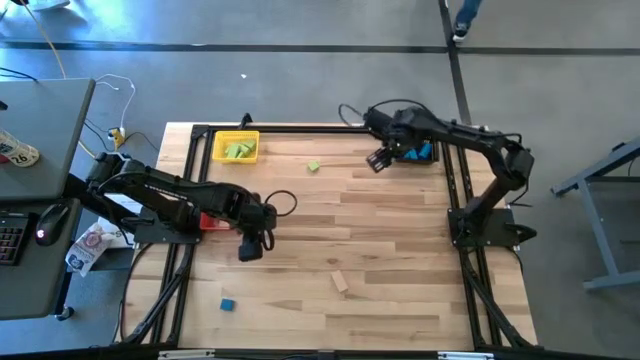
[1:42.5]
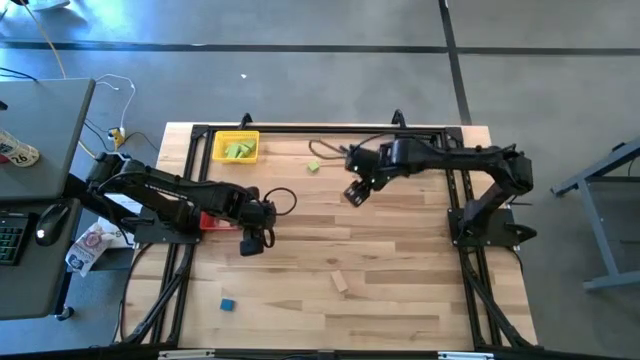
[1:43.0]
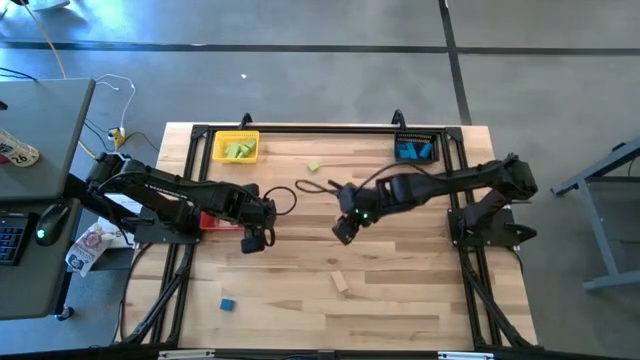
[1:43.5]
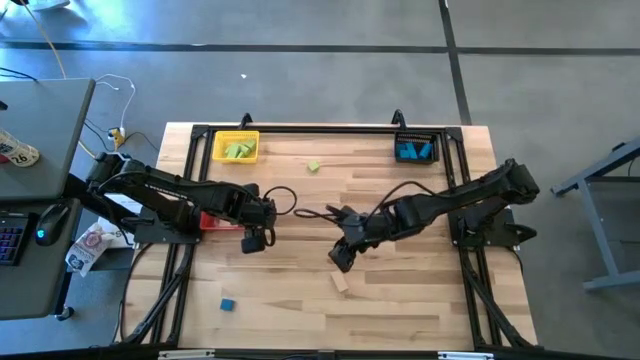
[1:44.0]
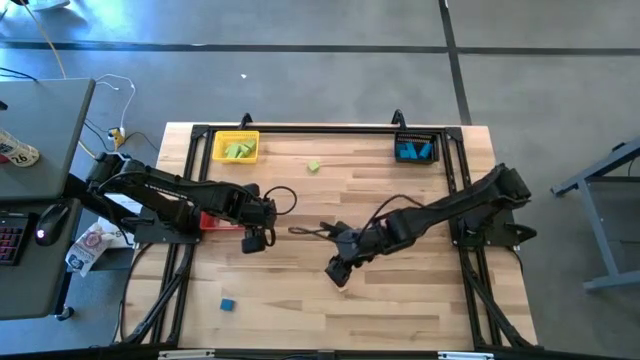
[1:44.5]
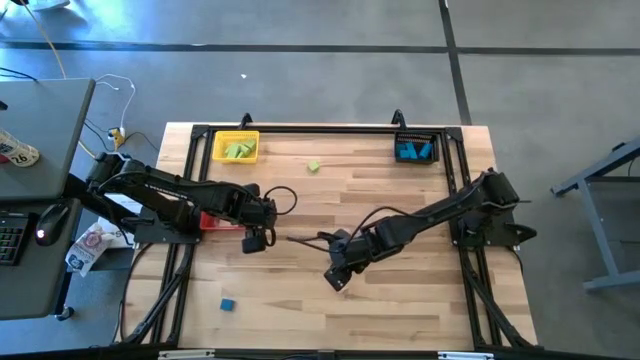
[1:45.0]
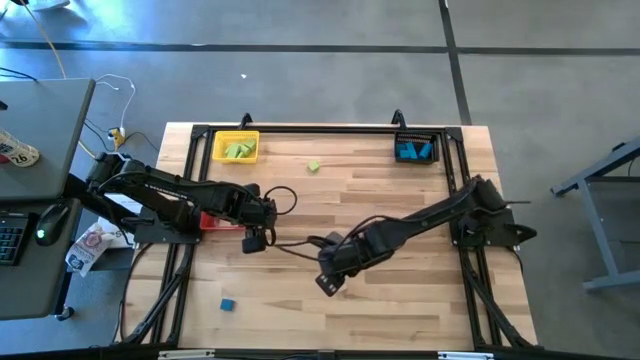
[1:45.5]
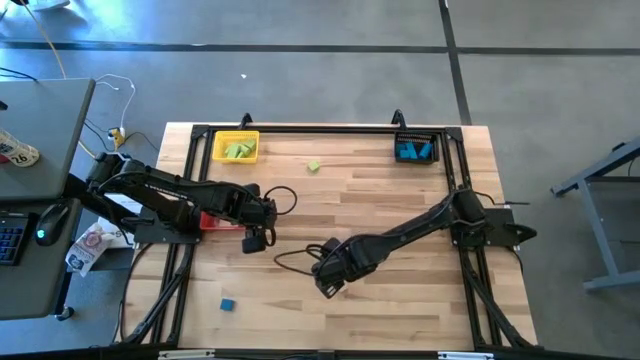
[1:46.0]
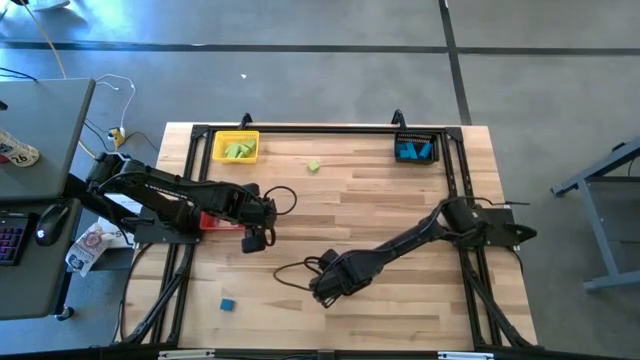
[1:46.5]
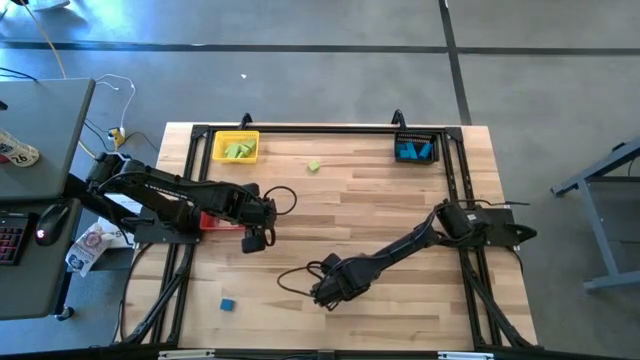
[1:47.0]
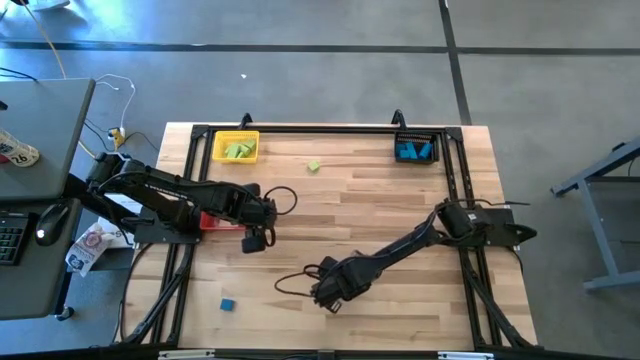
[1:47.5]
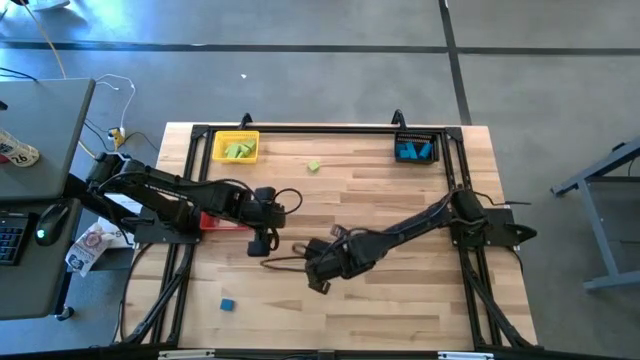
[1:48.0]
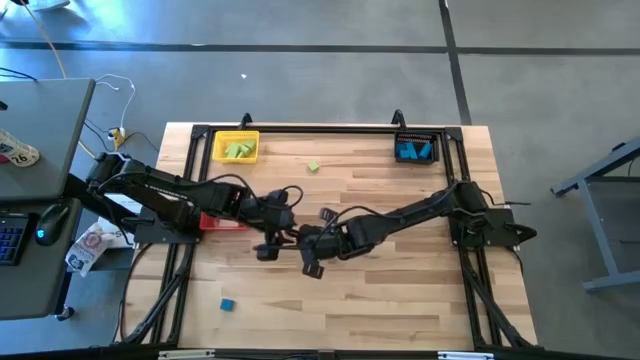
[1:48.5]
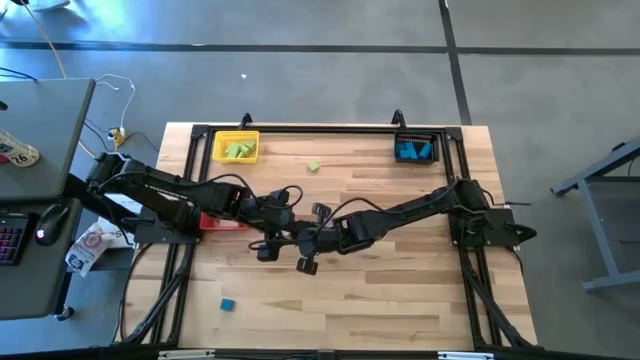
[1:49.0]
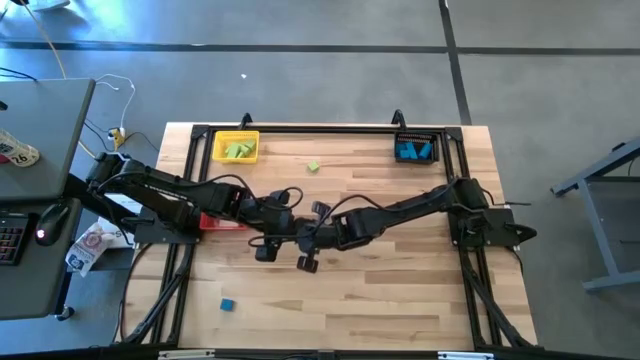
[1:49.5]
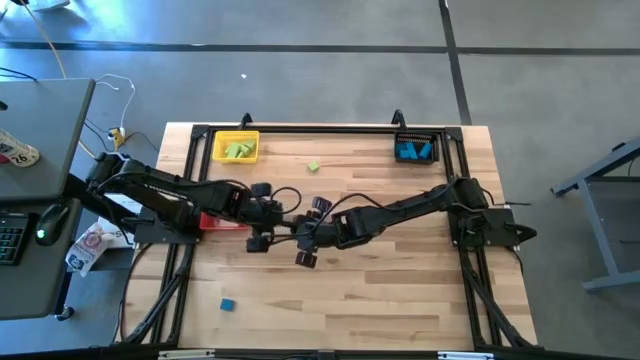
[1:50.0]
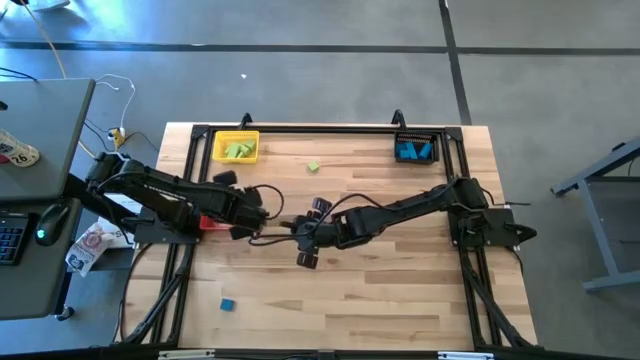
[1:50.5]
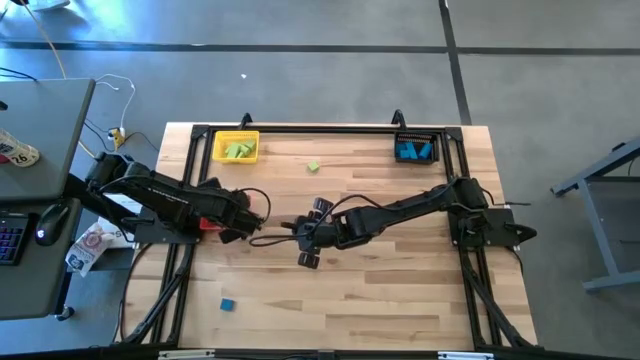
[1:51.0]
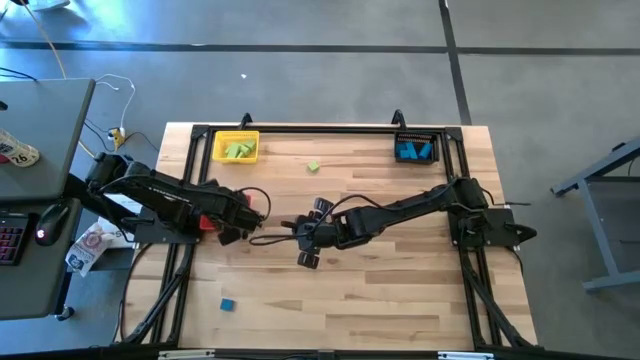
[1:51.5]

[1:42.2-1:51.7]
Task: Sort & place blocks by color
Put the brown block into the red bin

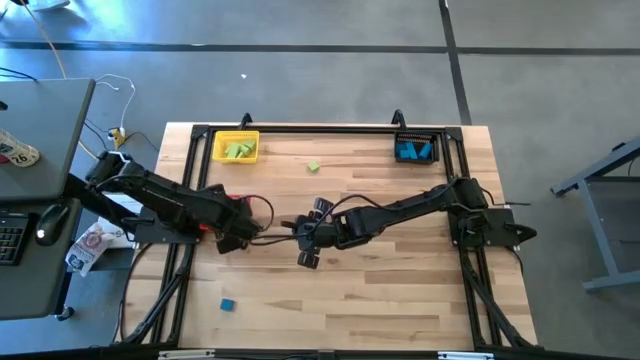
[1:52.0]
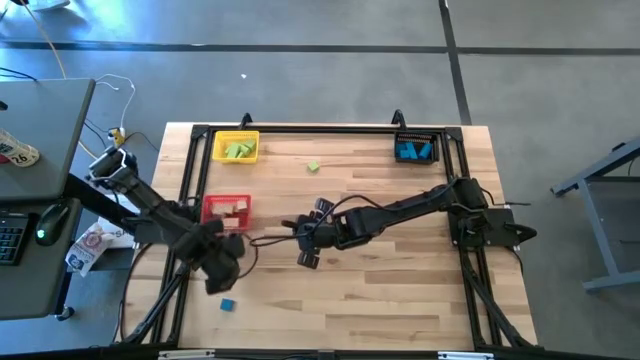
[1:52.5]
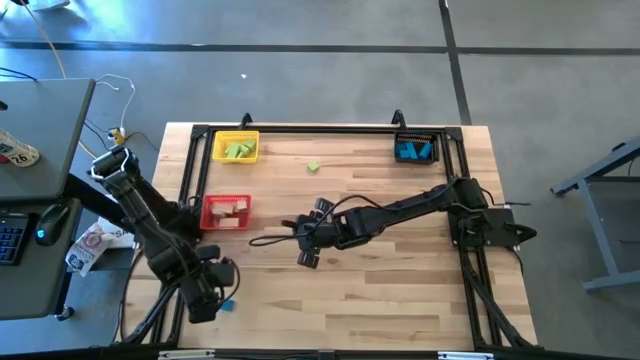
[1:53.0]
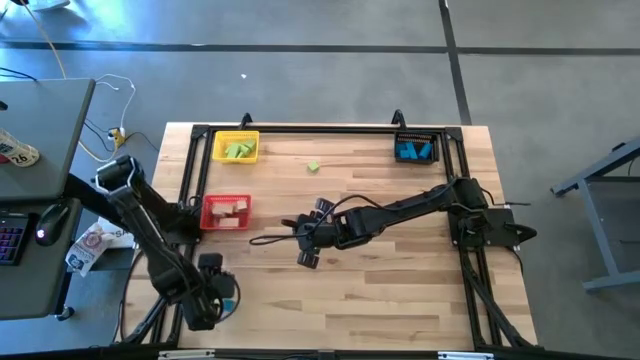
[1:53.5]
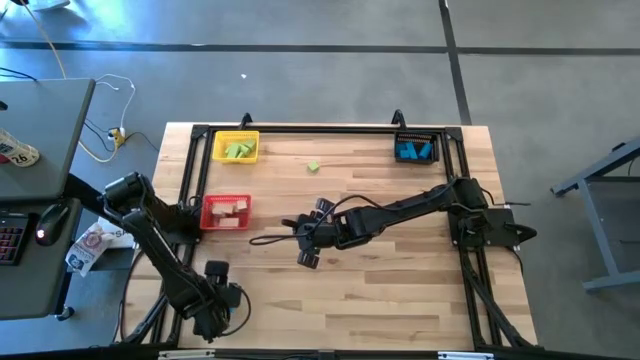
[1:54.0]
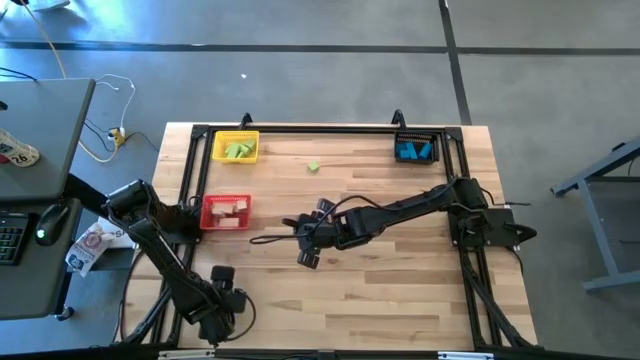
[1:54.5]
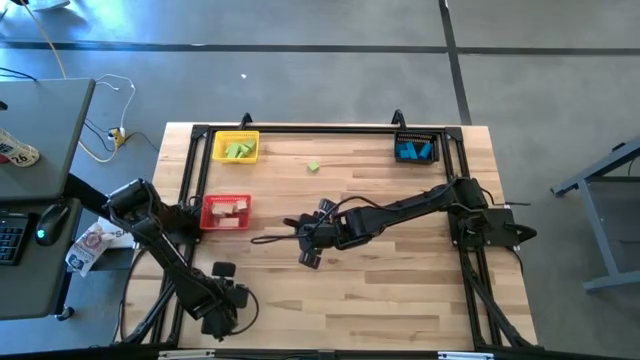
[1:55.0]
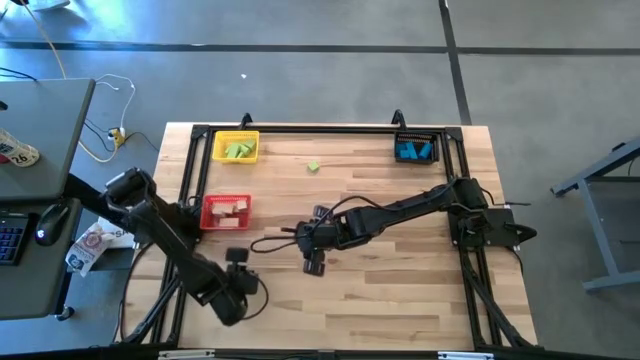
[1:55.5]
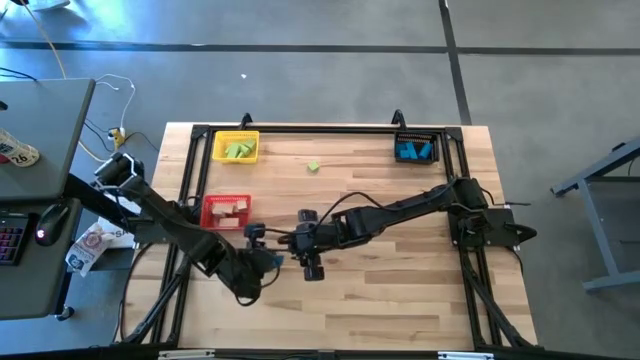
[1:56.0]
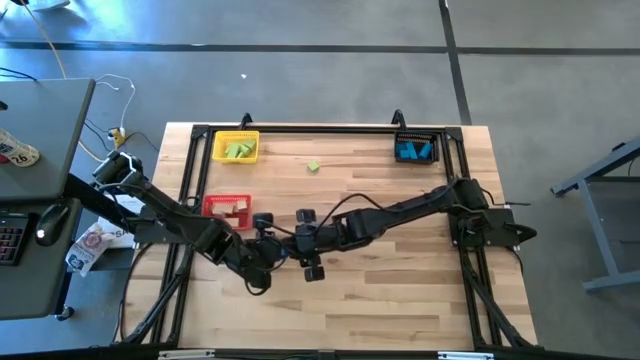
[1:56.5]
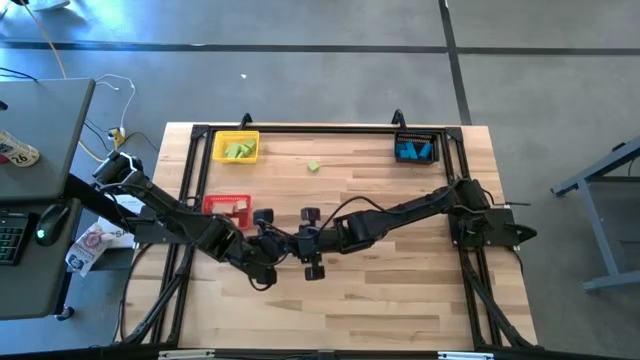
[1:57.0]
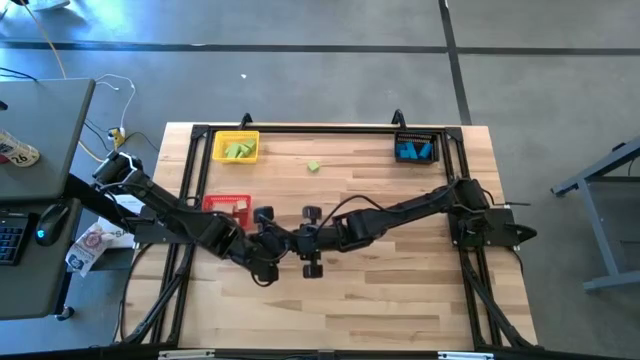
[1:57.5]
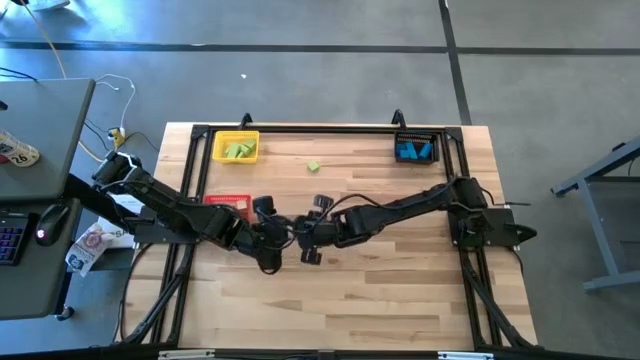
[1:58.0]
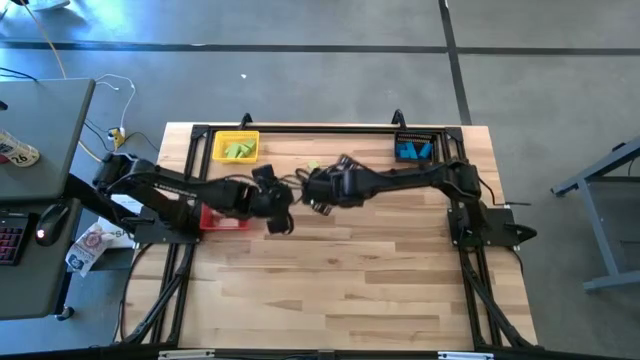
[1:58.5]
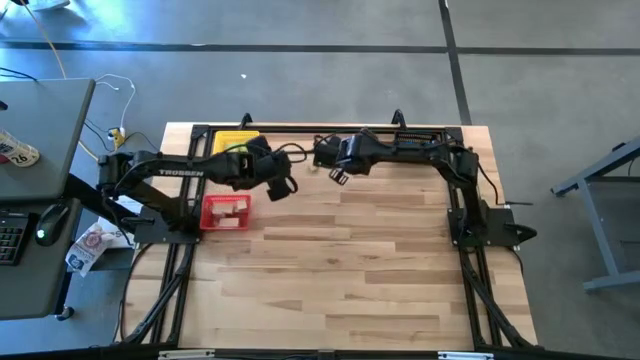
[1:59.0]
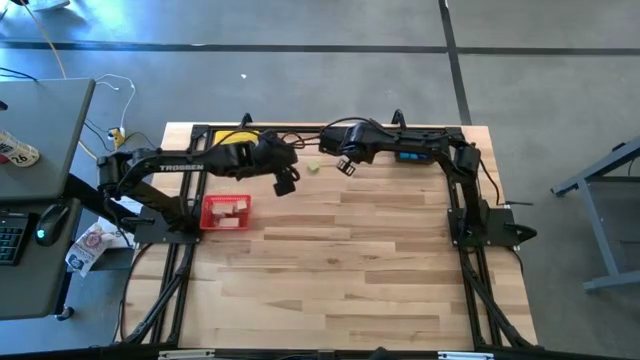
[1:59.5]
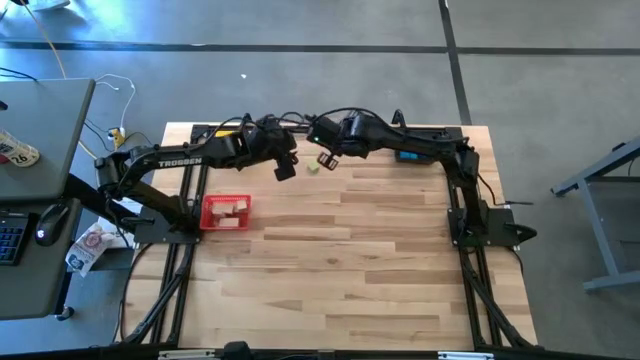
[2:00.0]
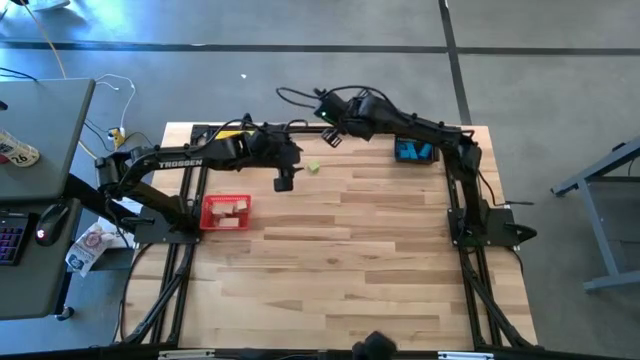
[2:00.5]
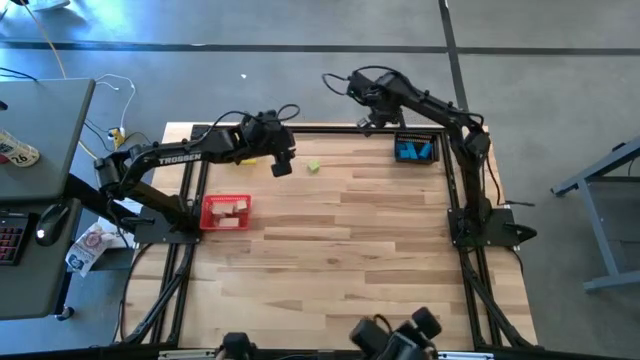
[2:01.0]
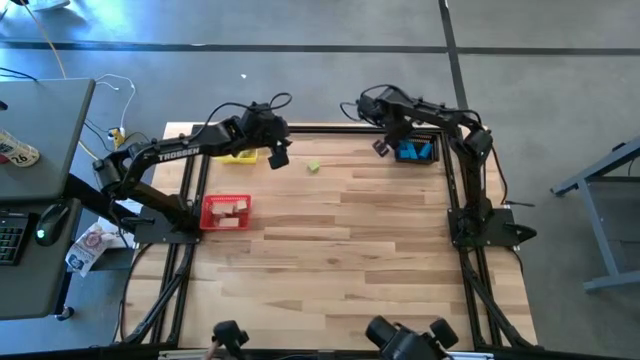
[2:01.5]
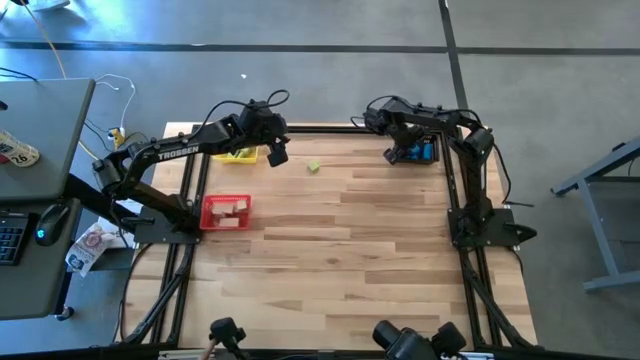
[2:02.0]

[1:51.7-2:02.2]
Put the blue block into the black bin

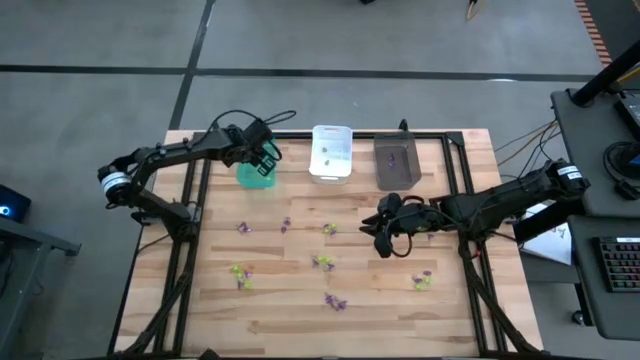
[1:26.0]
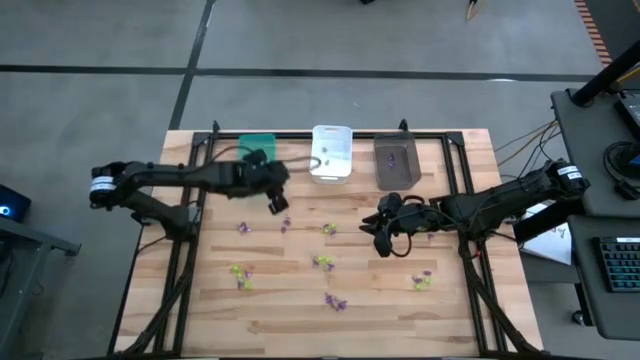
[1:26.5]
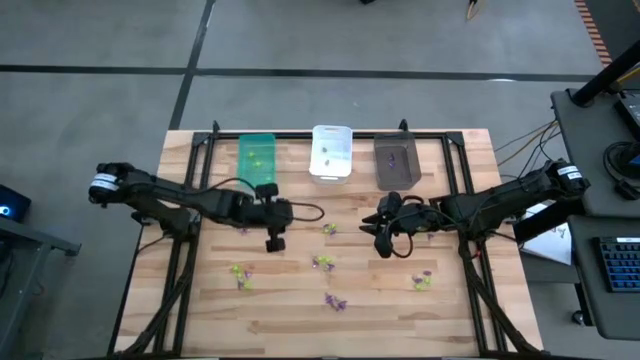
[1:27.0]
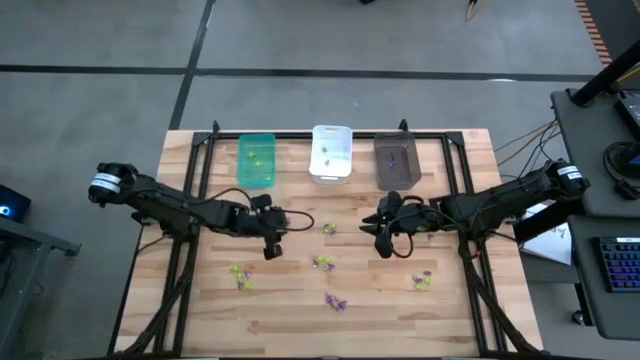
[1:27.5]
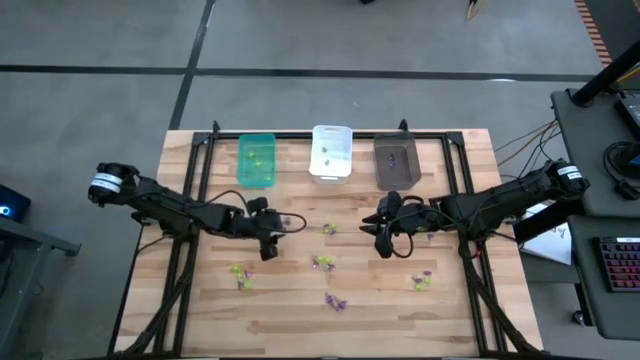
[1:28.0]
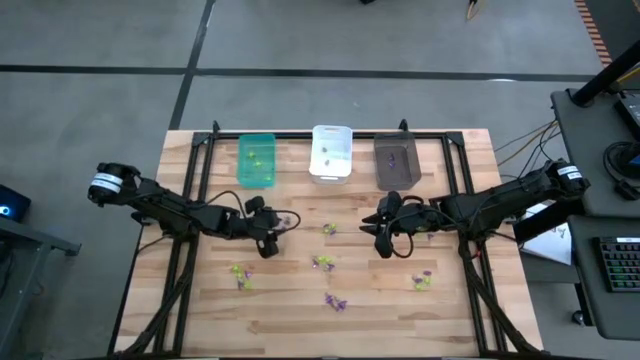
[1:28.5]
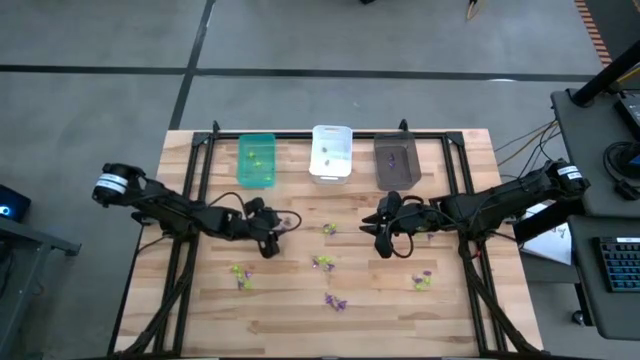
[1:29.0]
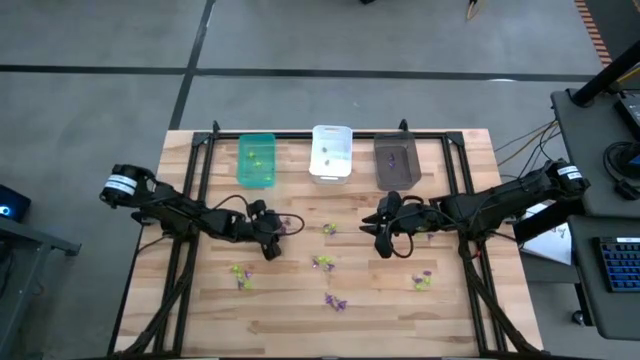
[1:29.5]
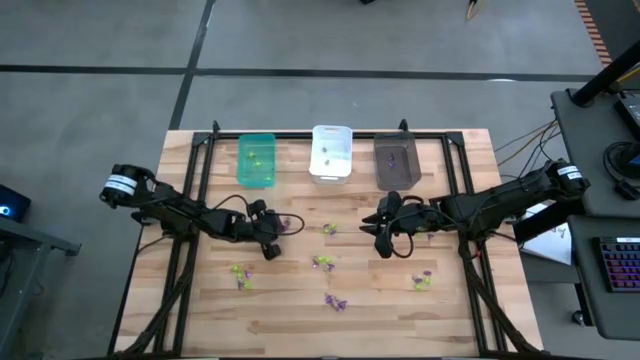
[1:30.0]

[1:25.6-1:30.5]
Task: Sort Halloween decoration
Put the purple witch hat toy into the gray bin
